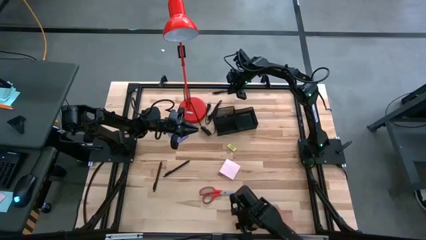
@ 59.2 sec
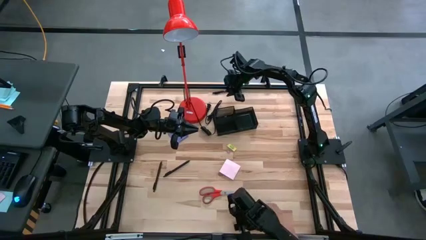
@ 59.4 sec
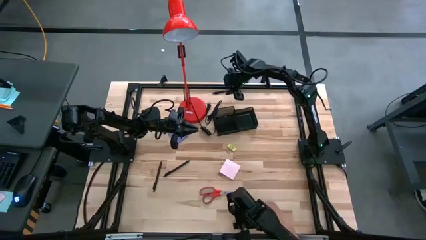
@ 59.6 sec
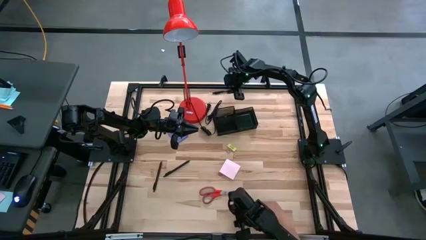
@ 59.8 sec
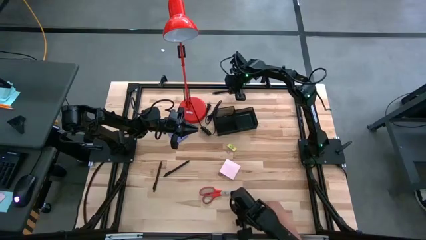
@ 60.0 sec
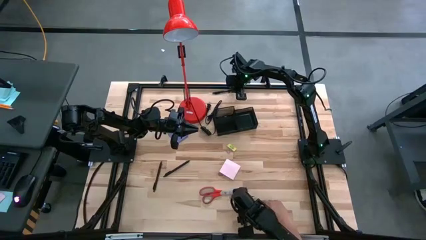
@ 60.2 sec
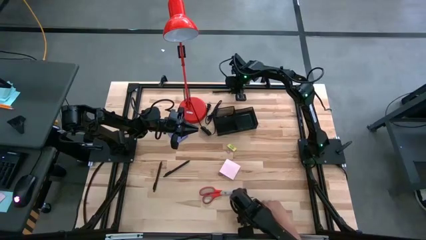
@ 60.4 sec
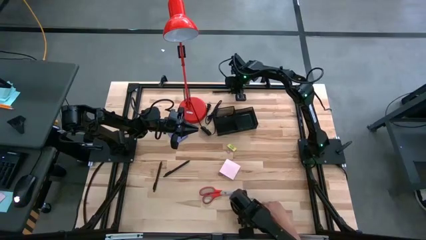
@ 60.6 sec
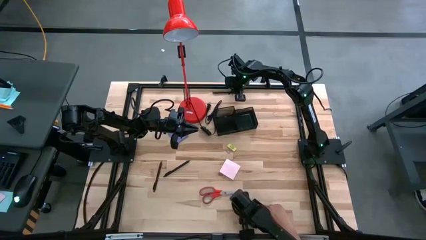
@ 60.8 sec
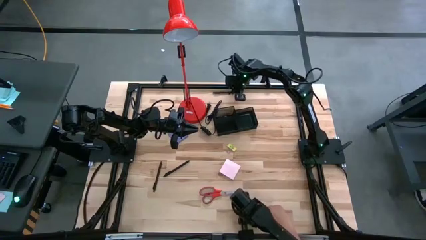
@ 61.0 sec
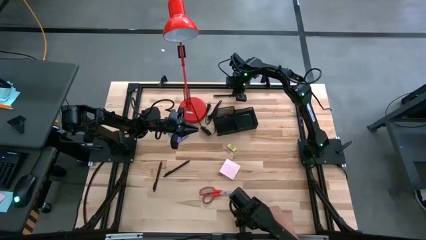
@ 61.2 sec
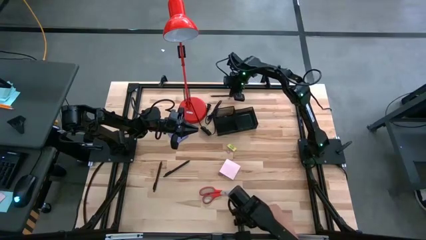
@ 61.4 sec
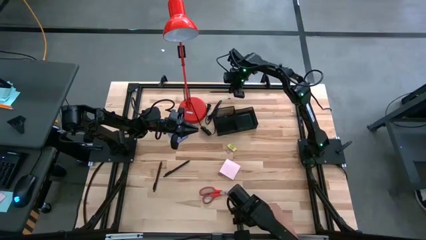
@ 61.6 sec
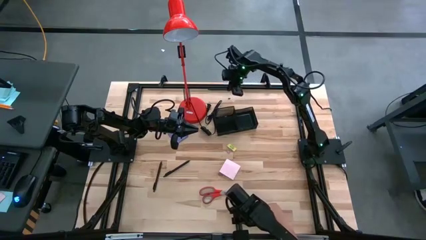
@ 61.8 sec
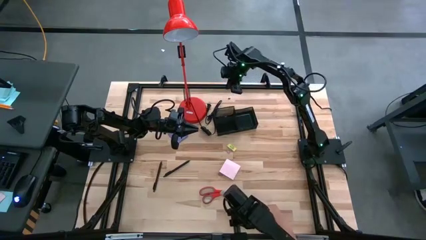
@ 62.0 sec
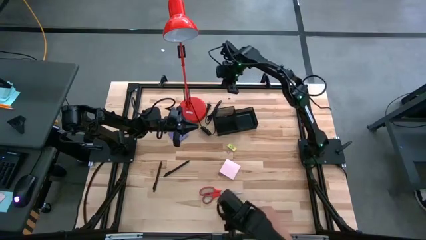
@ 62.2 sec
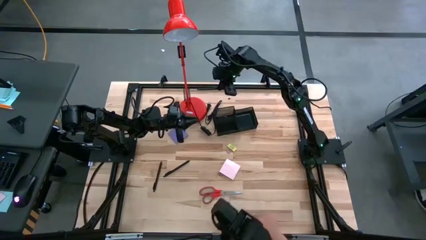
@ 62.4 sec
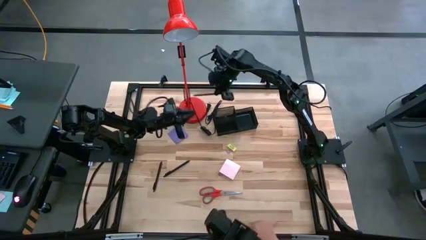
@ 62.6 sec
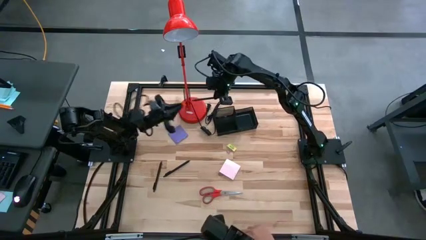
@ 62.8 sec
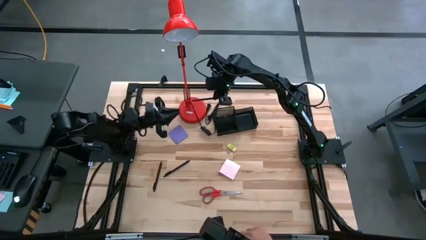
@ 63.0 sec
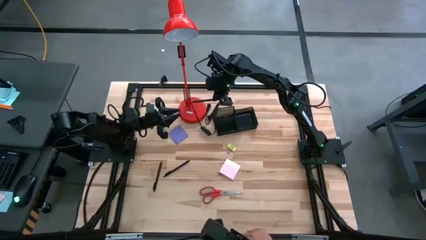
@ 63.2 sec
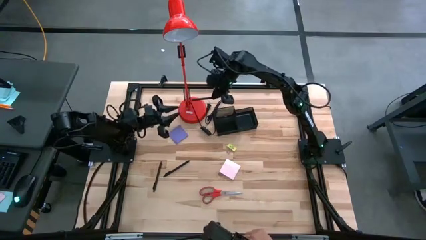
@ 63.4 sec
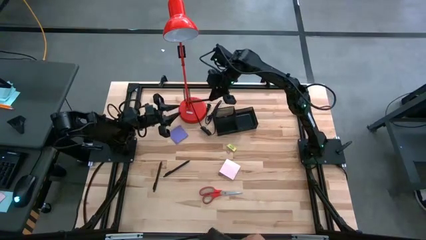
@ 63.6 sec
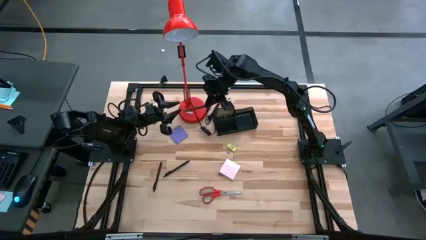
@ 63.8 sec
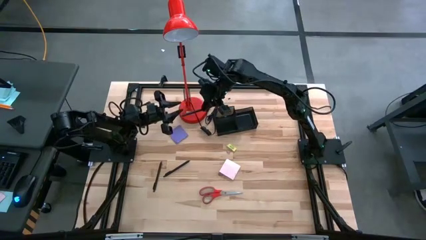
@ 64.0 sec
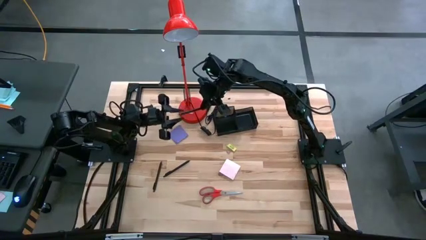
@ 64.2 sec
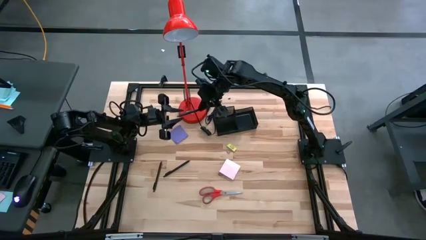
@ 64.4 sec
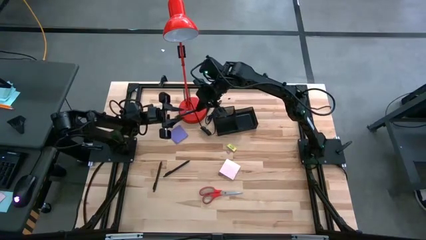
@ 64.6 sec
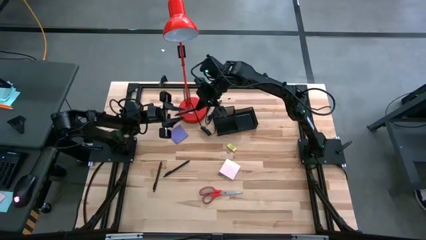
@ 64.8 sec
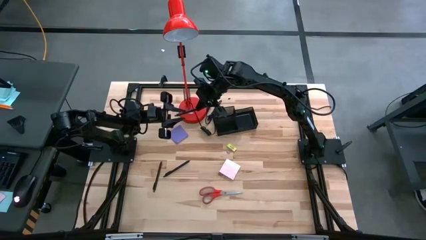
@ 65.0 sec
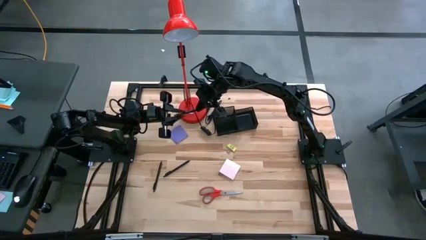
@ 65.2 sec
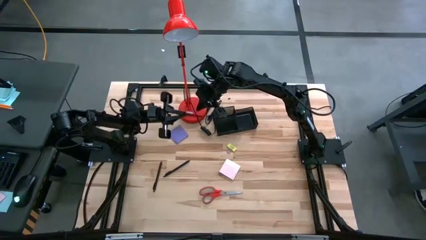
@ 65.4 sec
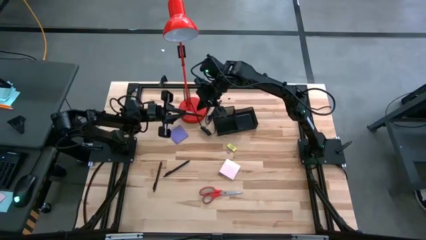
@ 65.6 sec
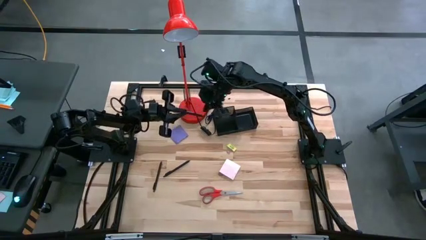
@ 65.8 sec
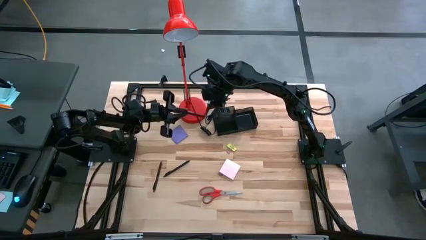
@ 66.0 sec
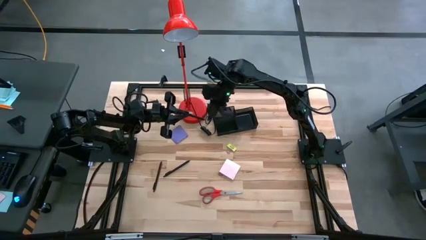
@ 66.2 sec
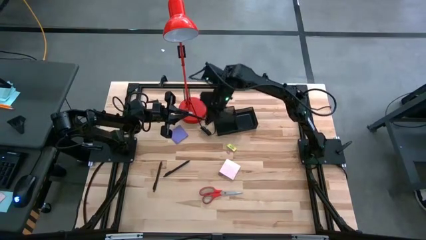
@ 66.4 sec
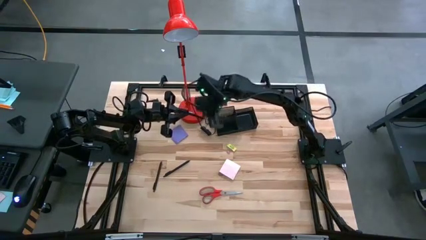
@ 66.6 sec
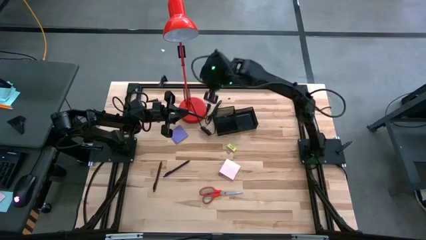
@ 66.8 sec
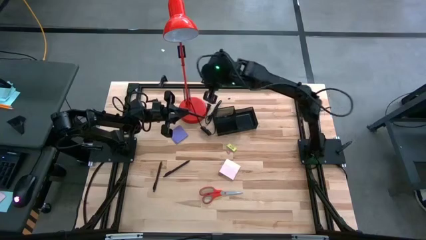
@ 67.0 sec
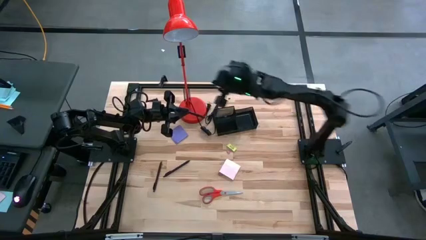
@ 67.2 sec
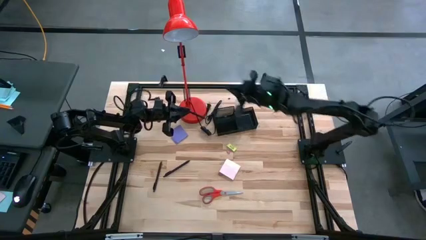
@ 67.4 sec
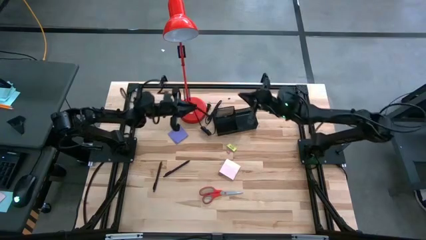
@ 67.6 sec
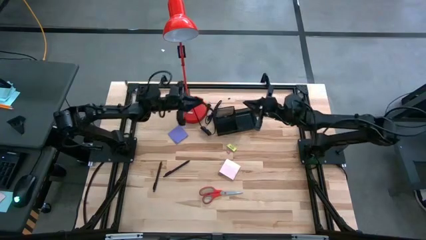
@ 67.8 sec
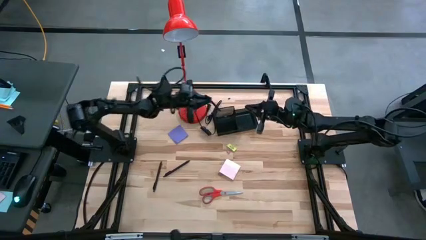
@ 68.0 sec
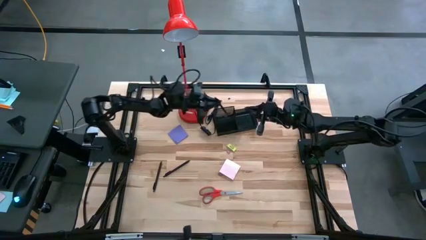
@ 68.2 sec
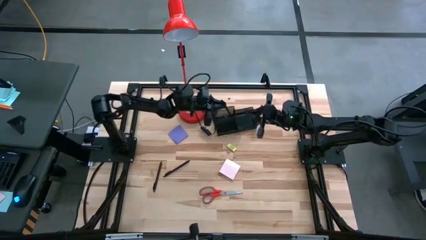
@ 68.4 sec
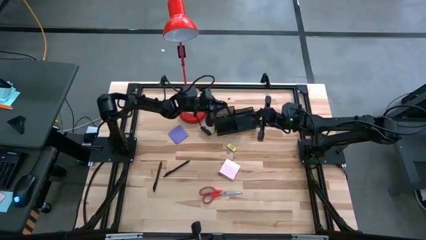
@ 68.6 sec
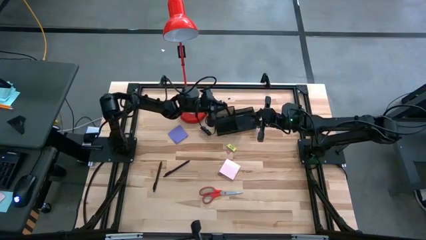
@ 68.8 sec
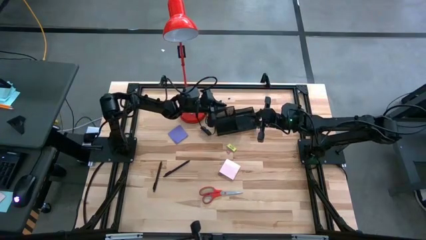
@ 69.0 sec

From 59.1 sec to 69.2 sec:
Task: Pick and place office supplies into organizer
Put the black pen into the black desk organizer
